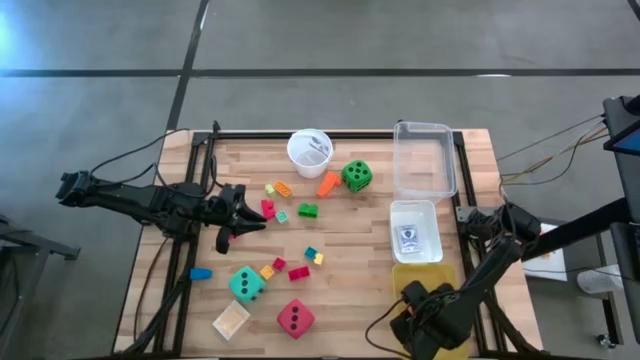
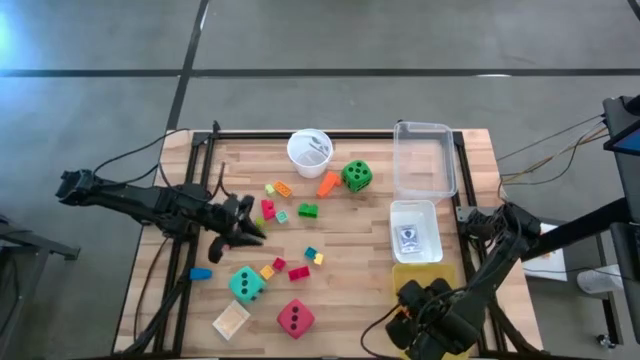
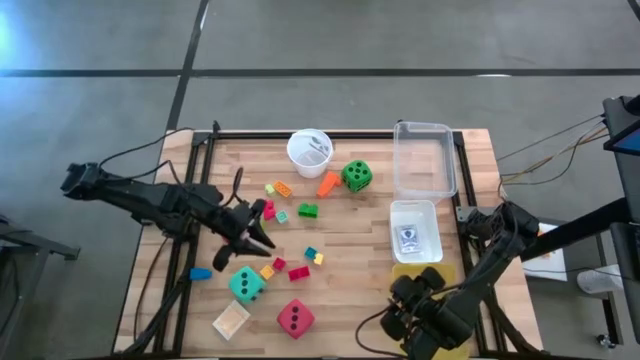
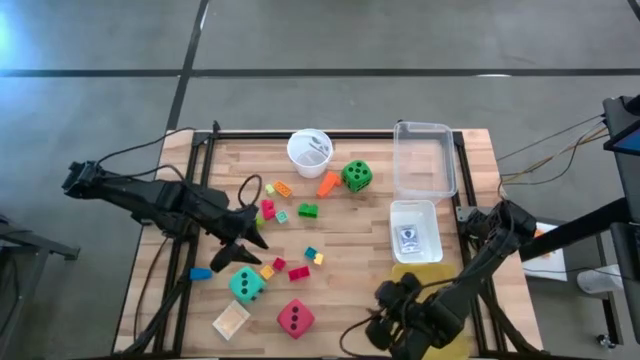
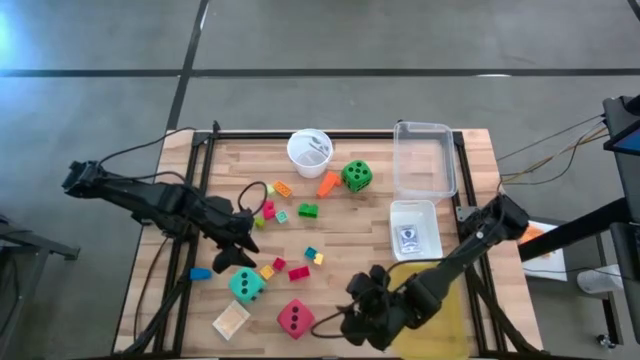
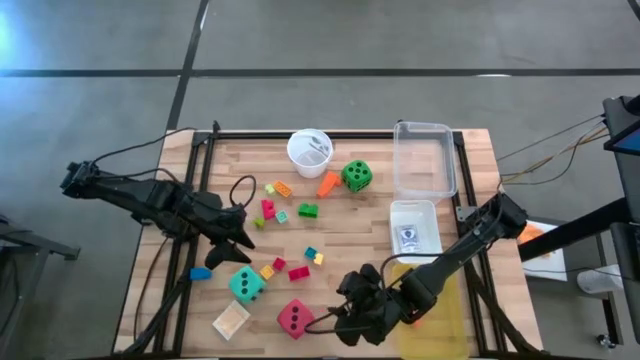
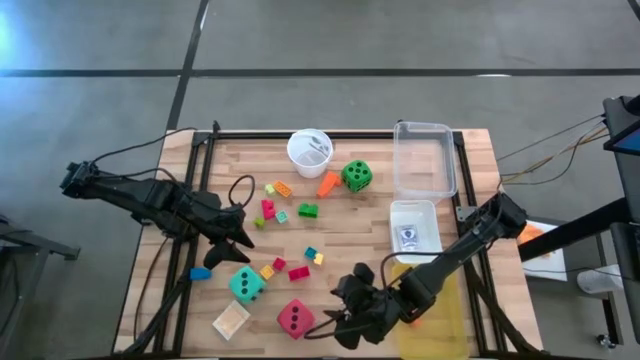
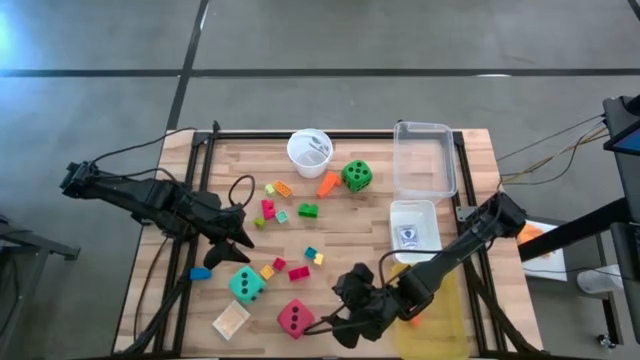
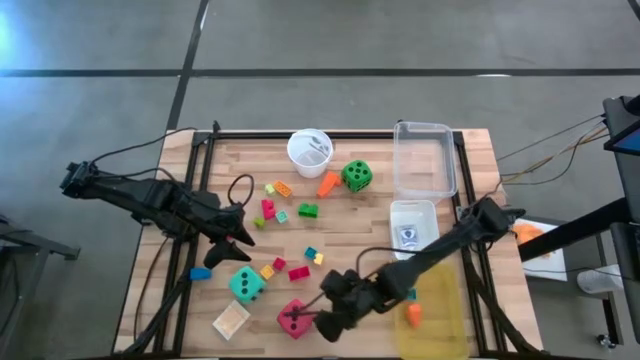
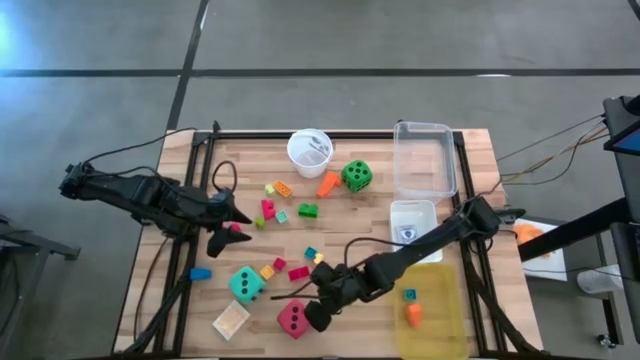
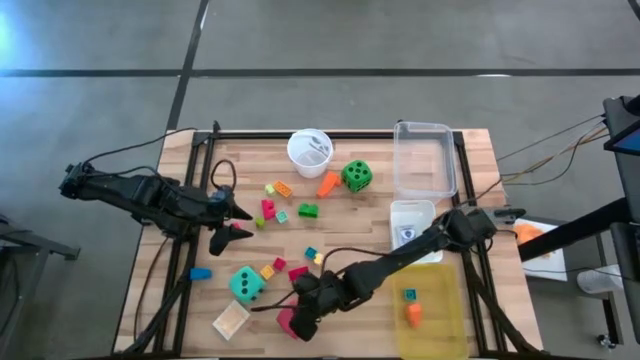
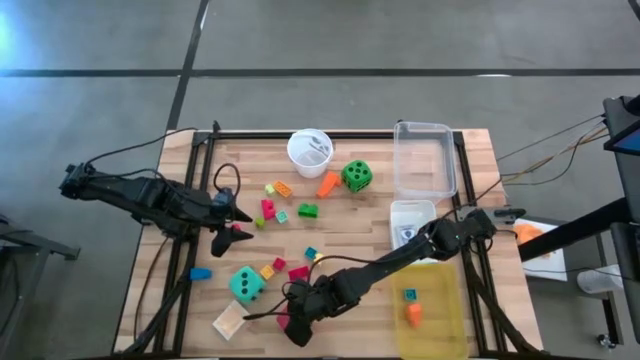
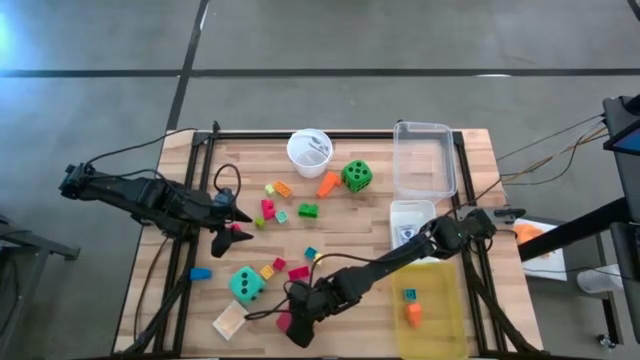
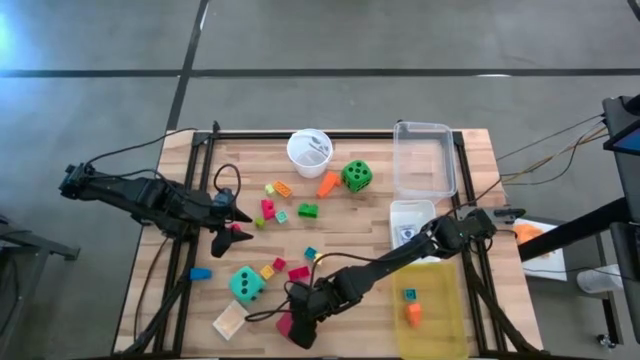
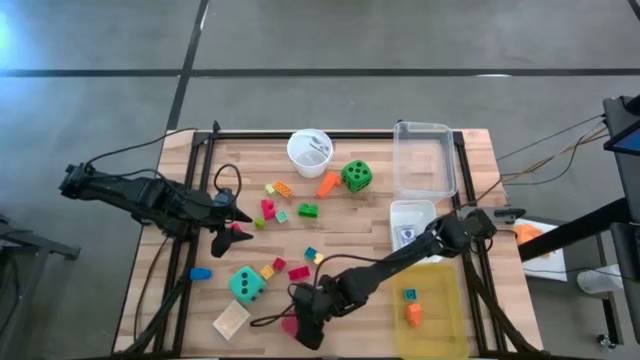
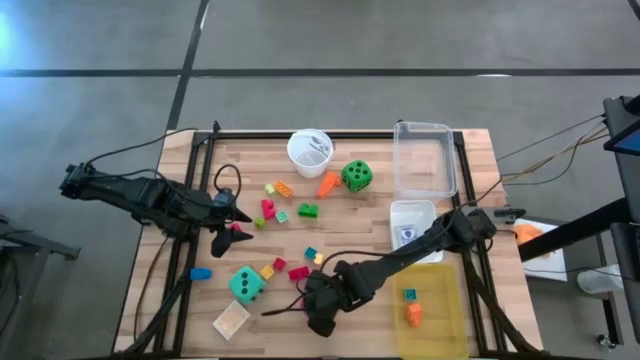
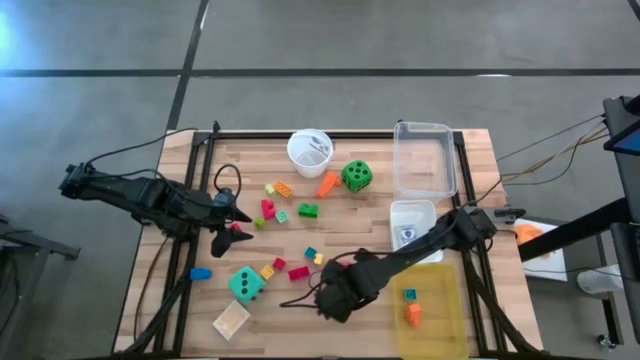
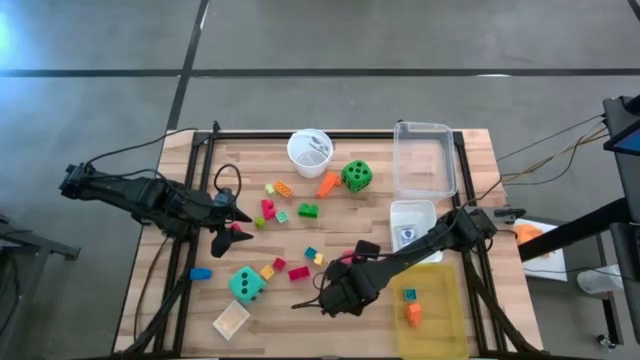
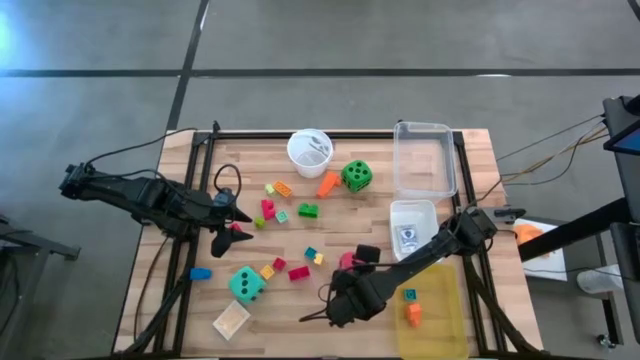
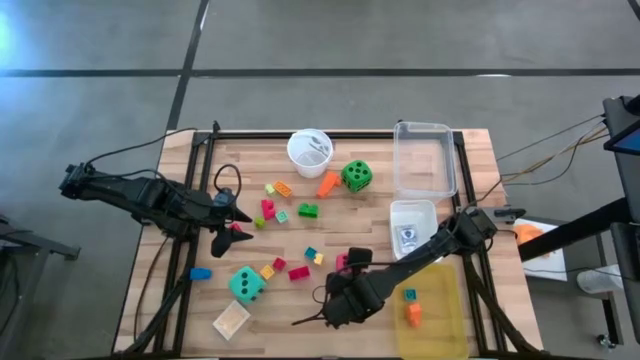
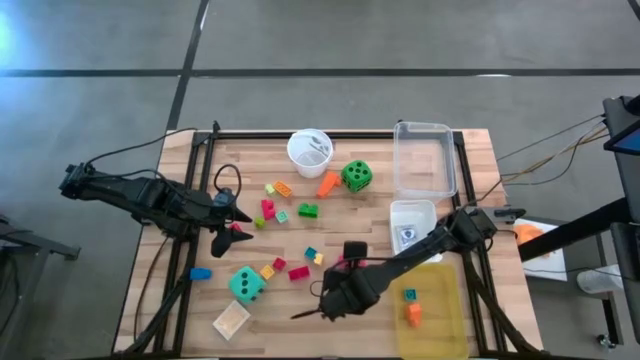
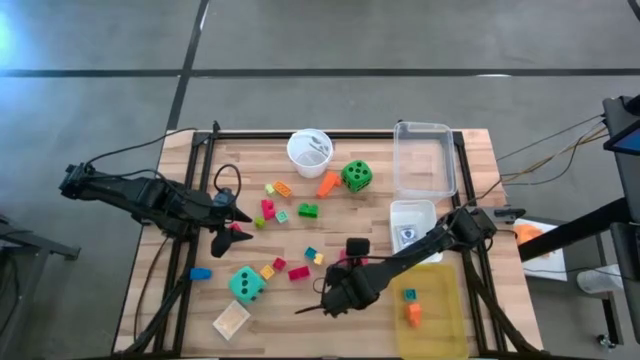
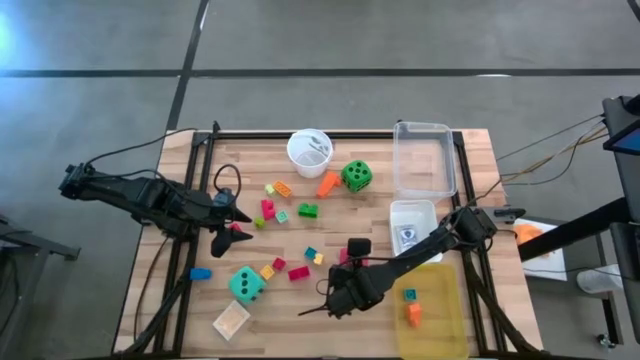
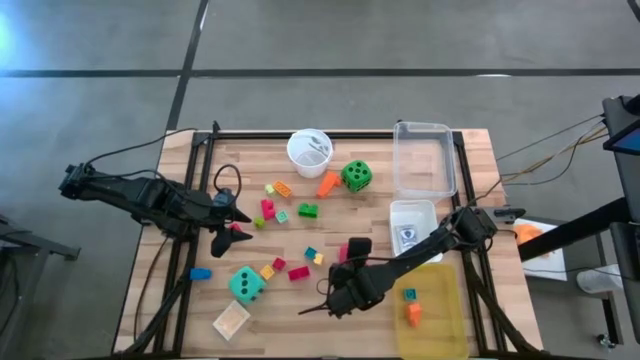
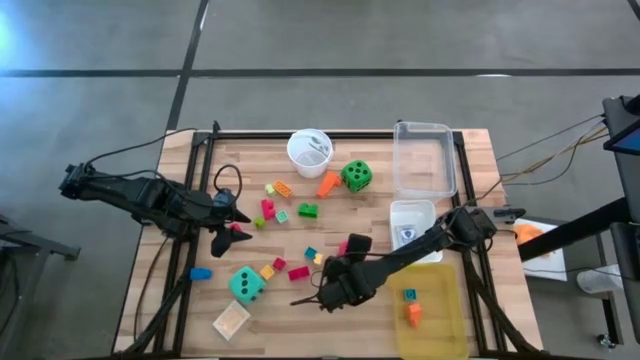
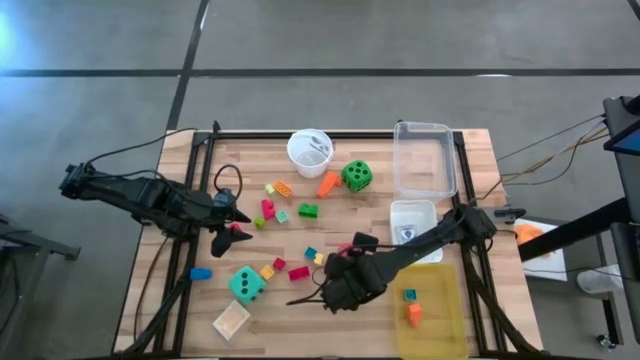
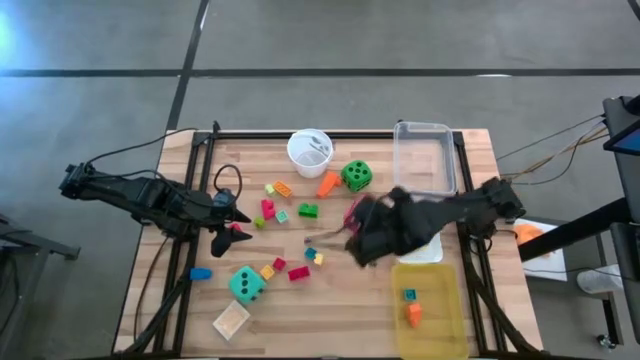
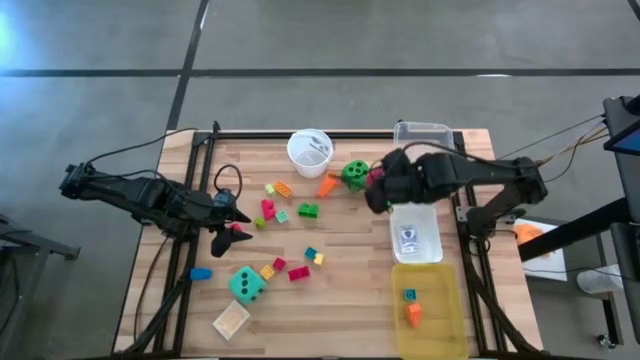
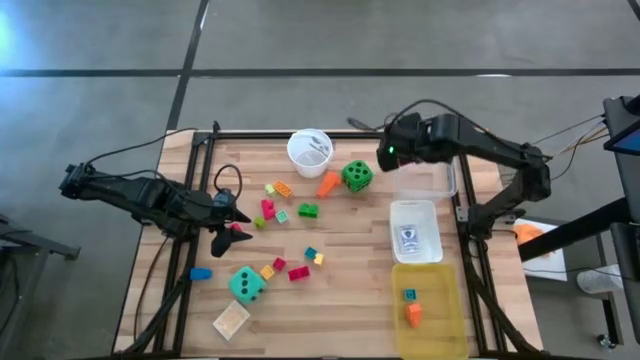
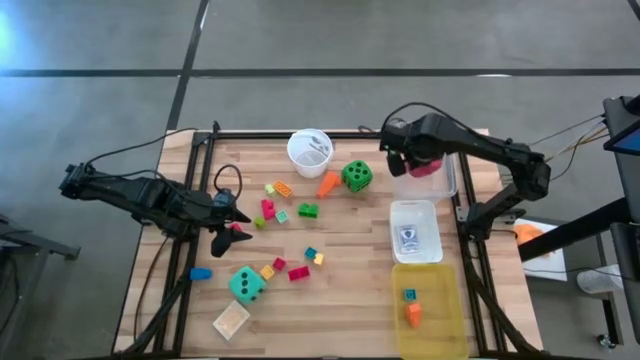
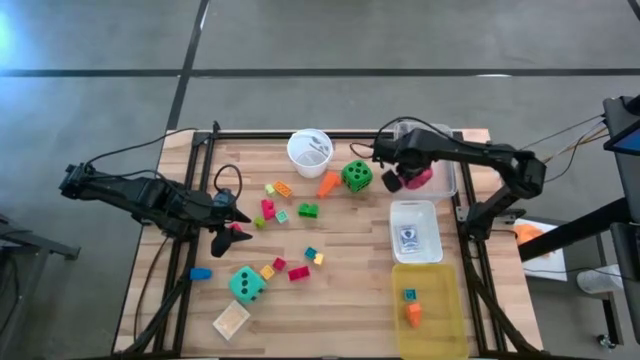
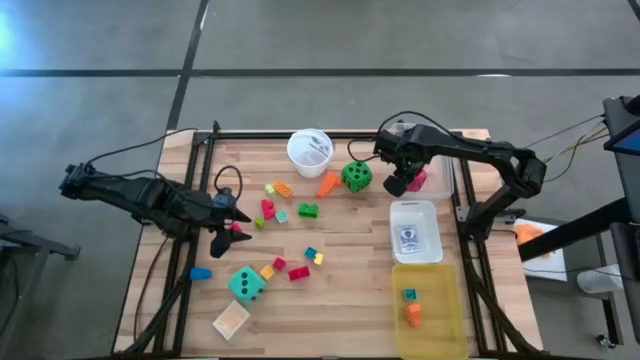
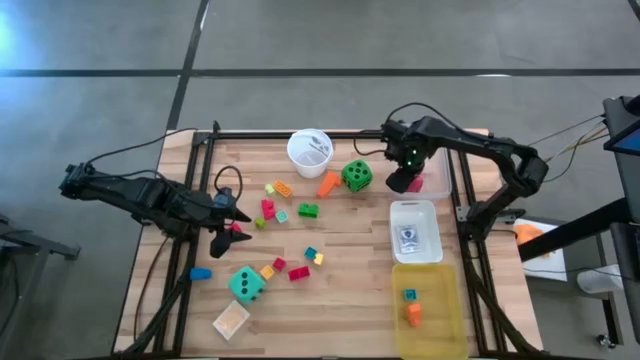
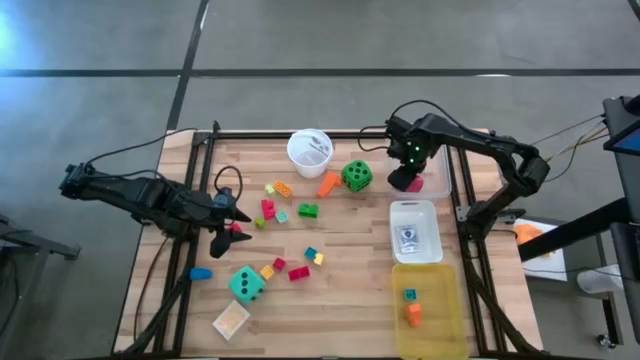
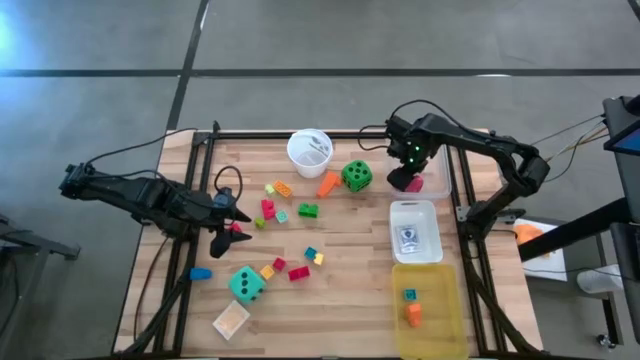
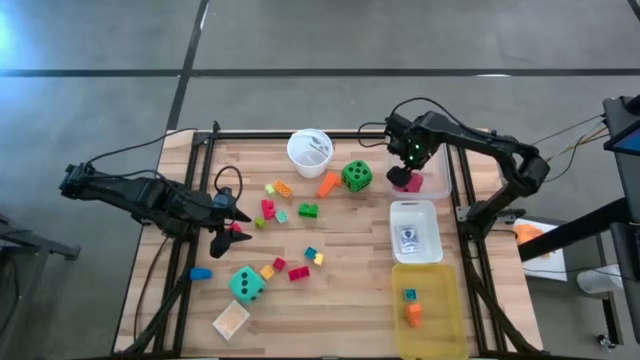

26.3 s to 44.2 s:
Task: Pick & Place Toys
Put the red dice into the transparent bin

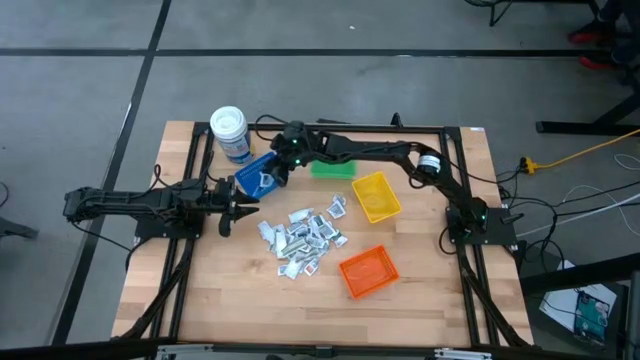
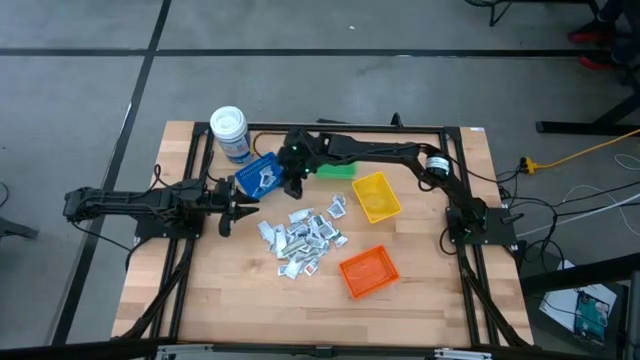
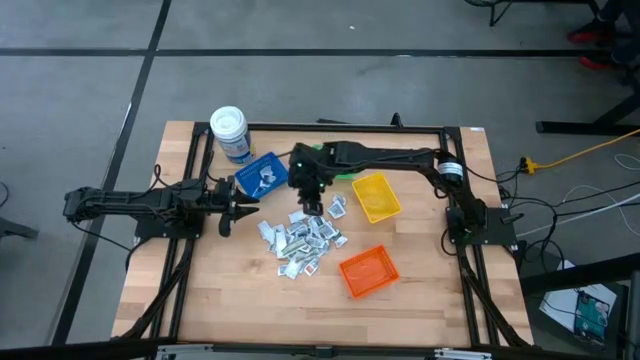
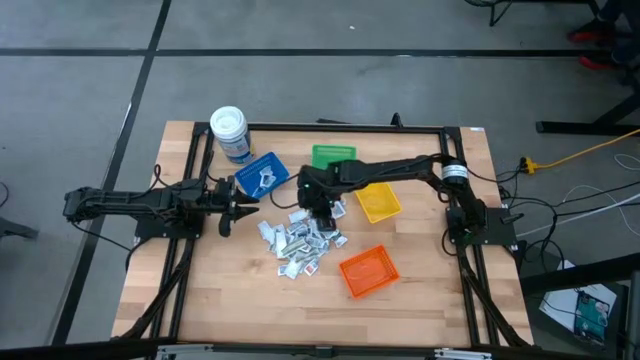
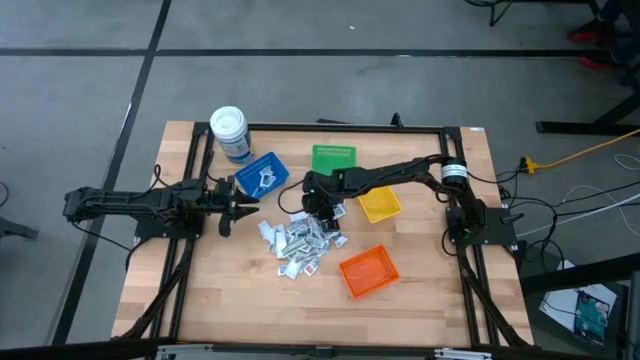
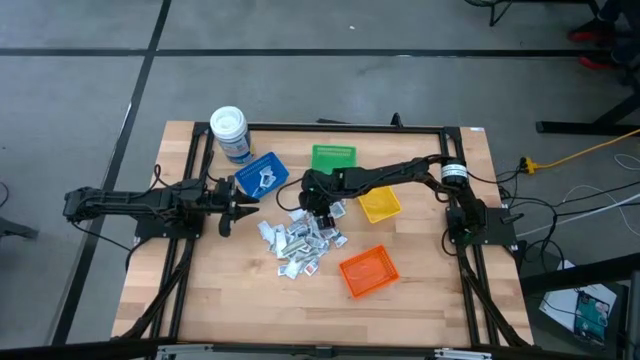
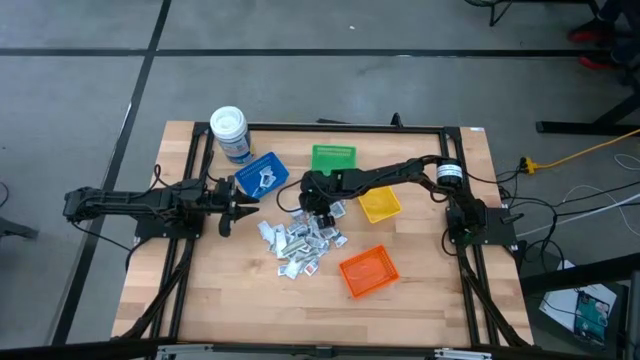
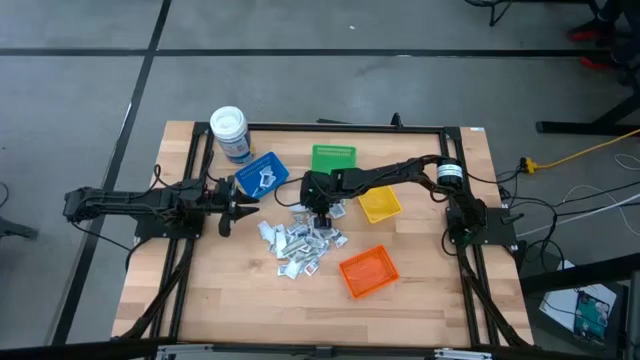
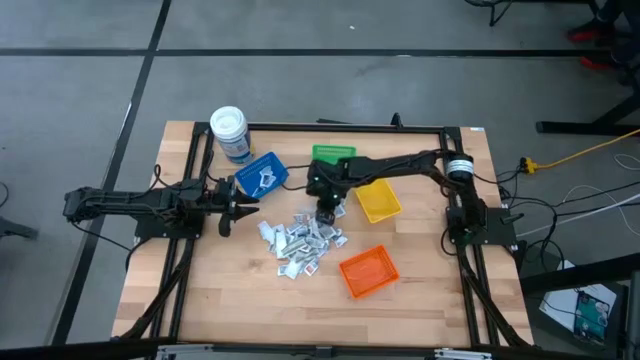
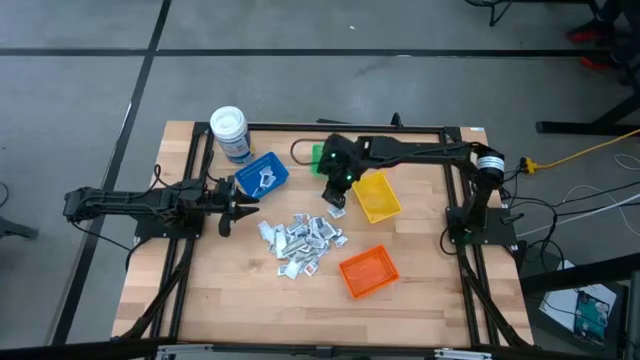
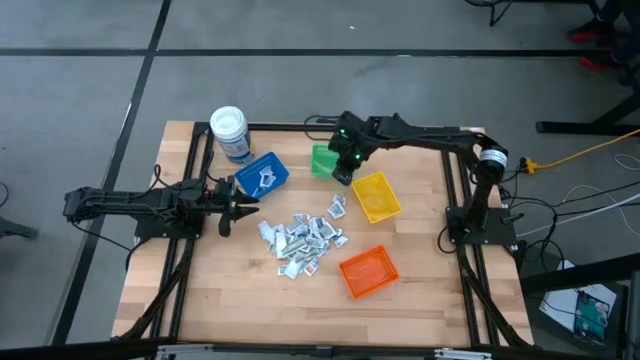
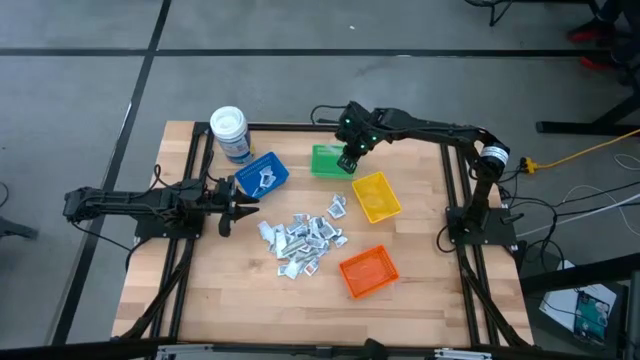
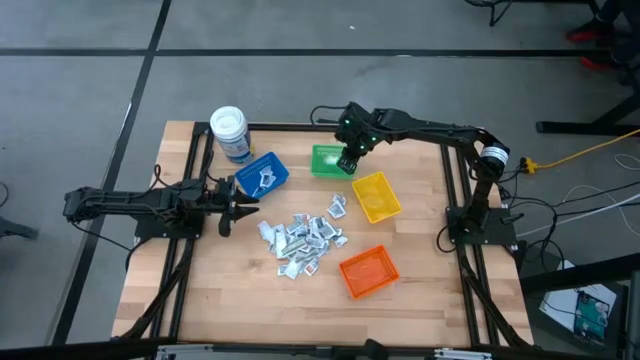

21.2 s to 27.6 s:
Task: Pick & Place First Aid Supplies
Put the white bandage into the green bin
